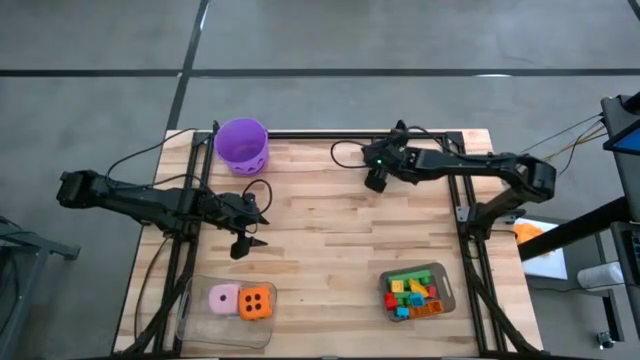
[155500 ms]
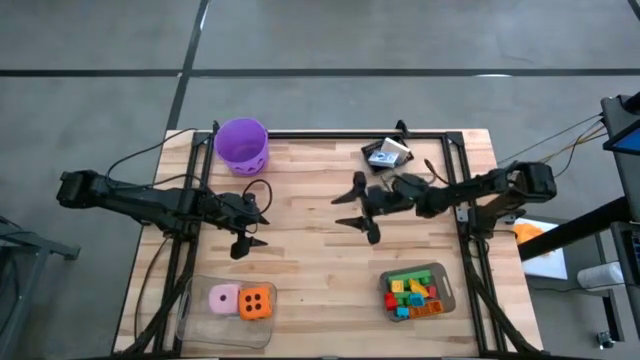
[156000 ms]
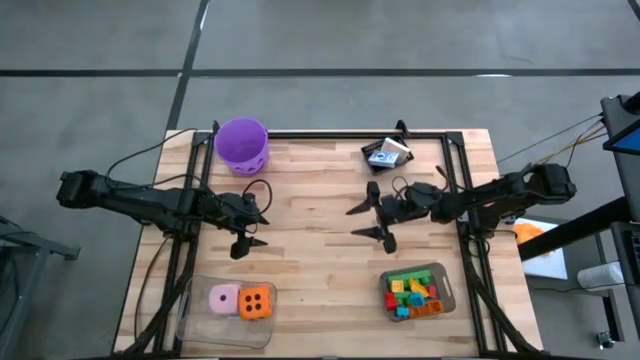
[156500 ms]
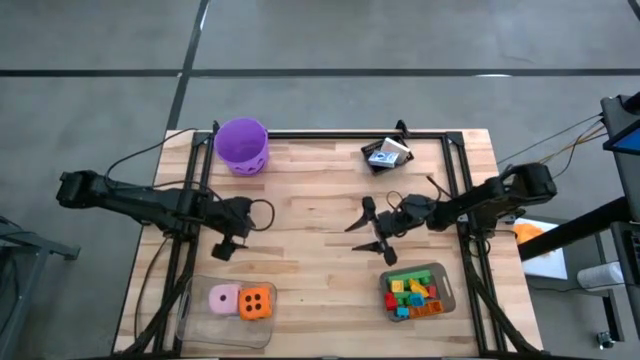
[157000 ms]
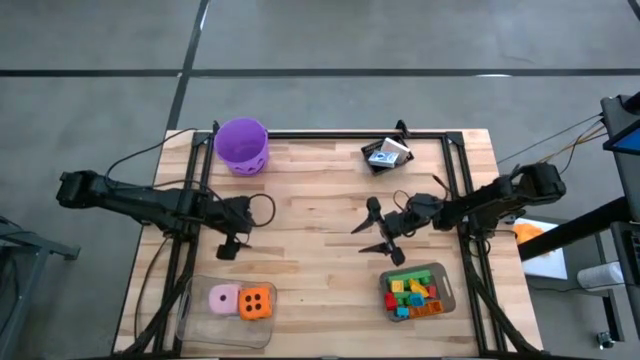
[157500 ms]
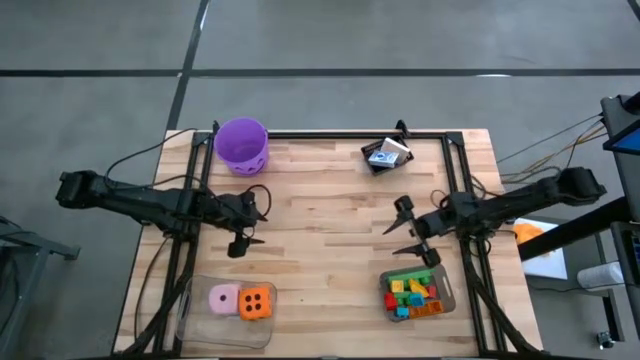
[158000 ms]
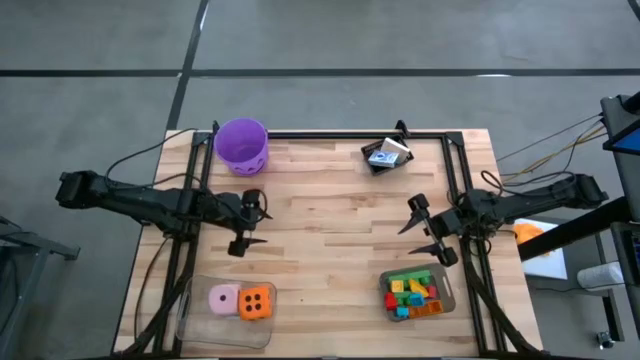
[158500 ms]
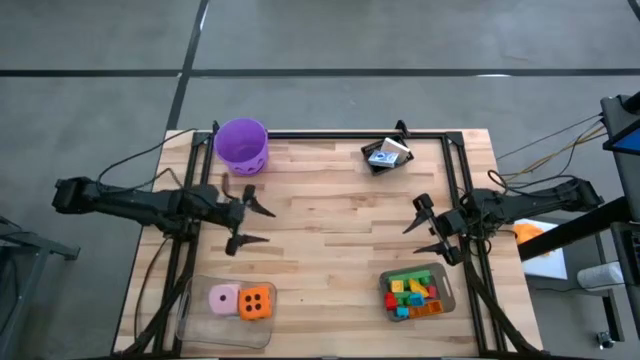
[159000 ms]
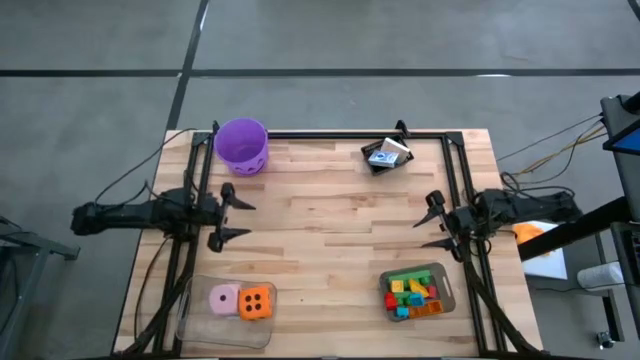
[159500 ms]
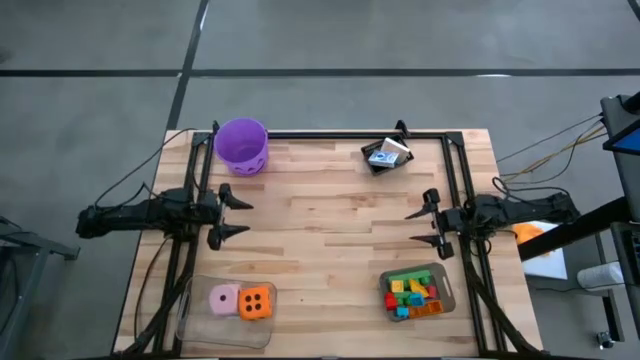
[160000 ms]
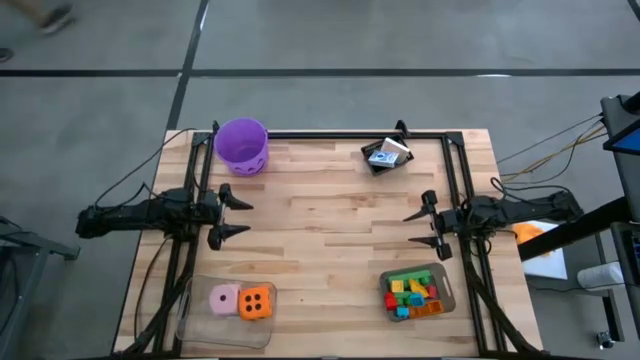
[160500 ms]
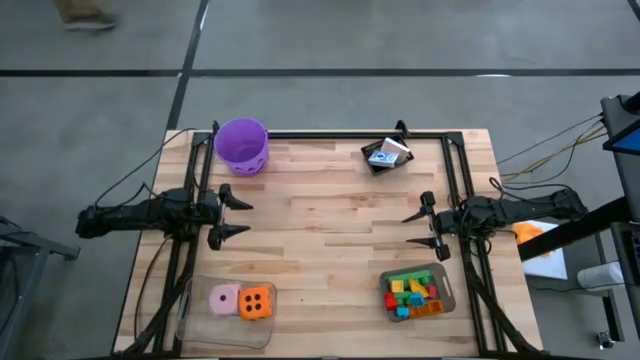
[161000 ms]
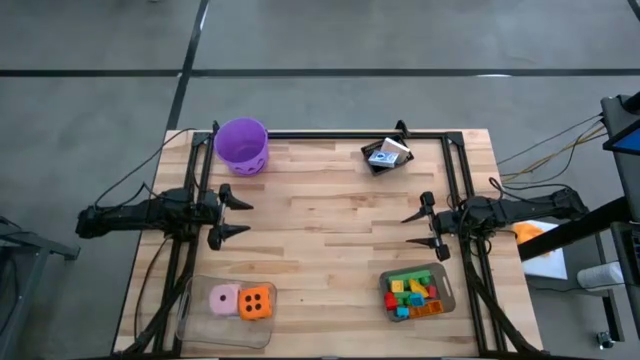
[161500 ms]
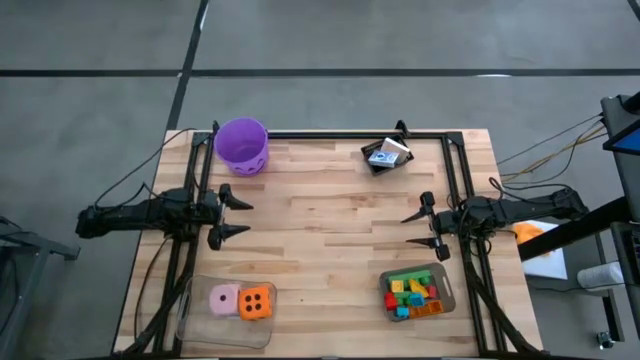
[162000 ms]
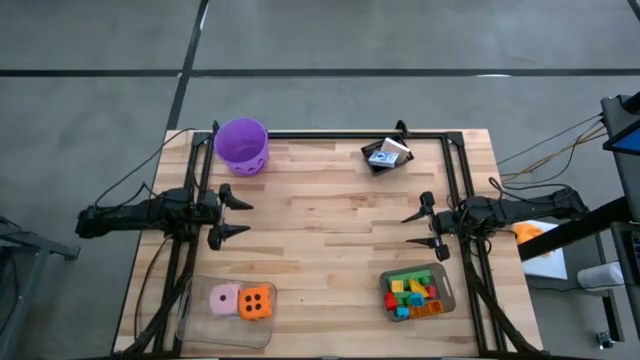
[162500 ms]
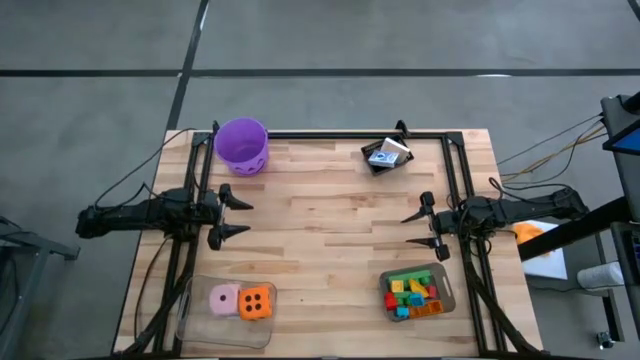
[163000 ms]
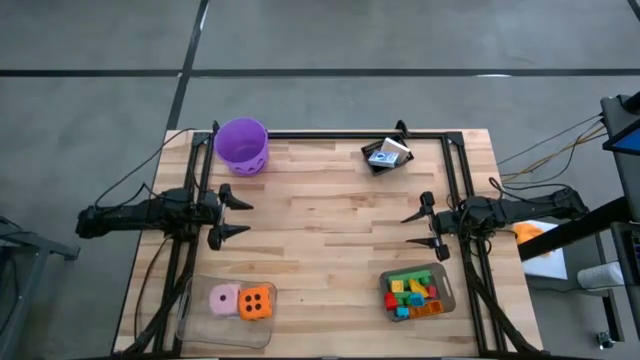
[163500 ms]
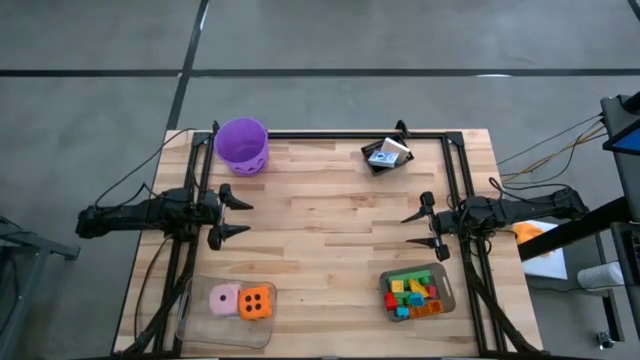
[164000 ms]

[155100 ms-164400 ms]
Task: Pick & Place Toys
Return to Home Position

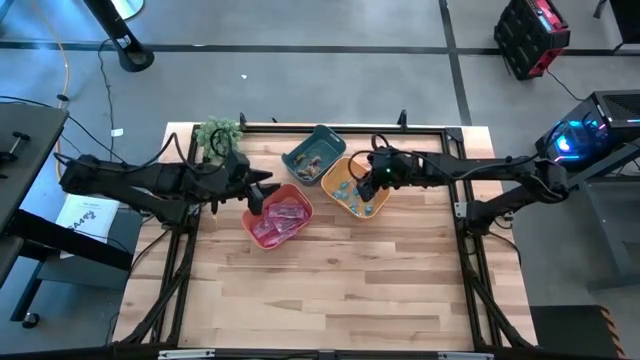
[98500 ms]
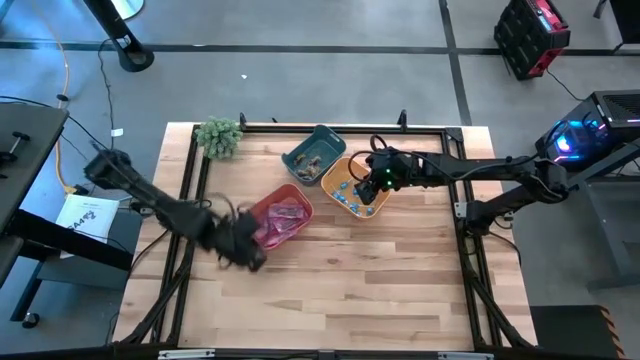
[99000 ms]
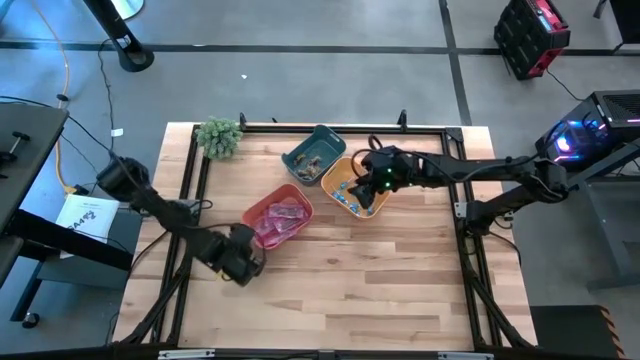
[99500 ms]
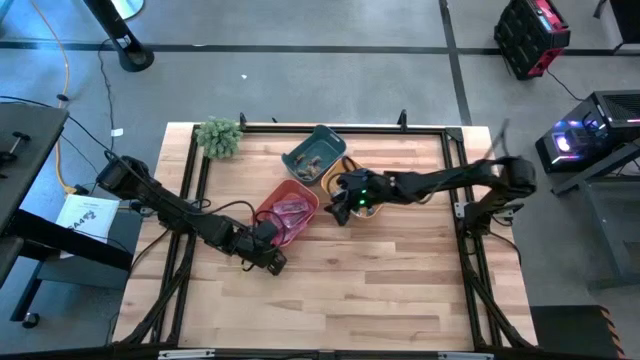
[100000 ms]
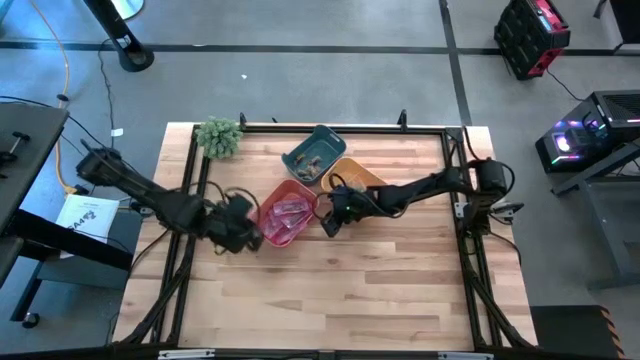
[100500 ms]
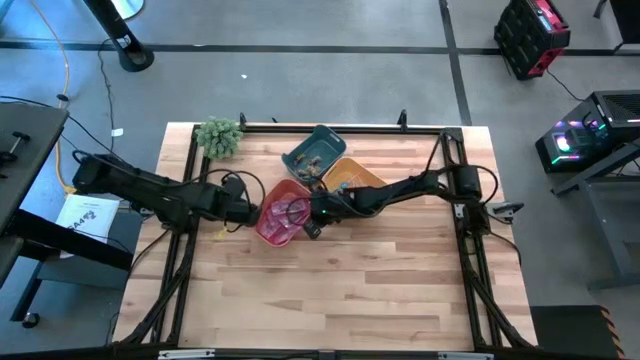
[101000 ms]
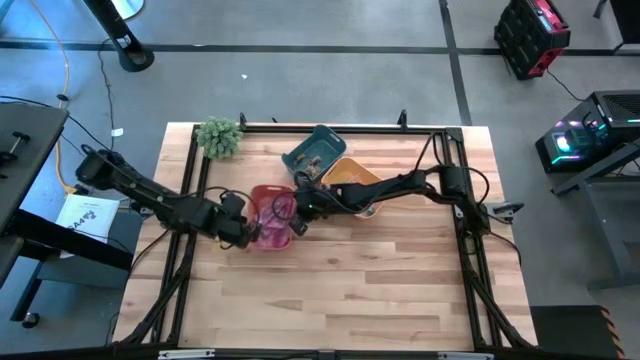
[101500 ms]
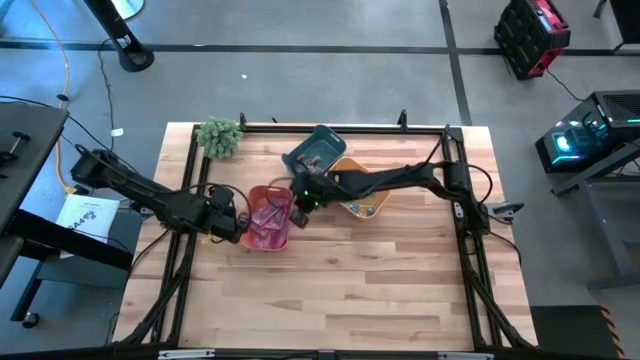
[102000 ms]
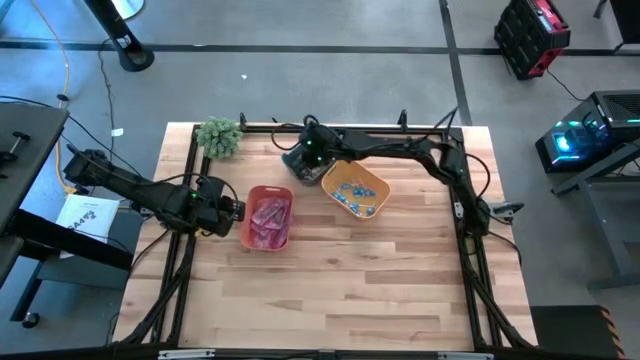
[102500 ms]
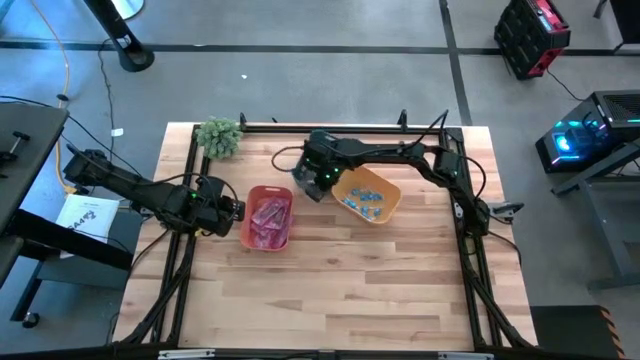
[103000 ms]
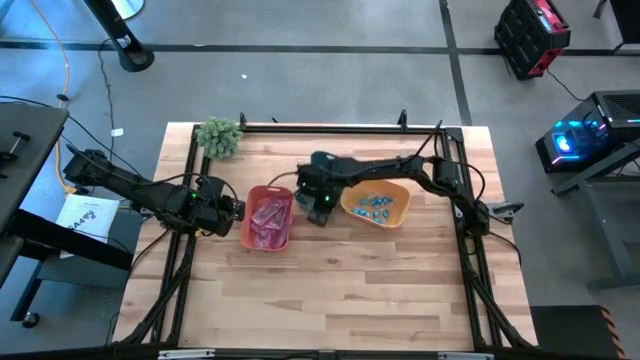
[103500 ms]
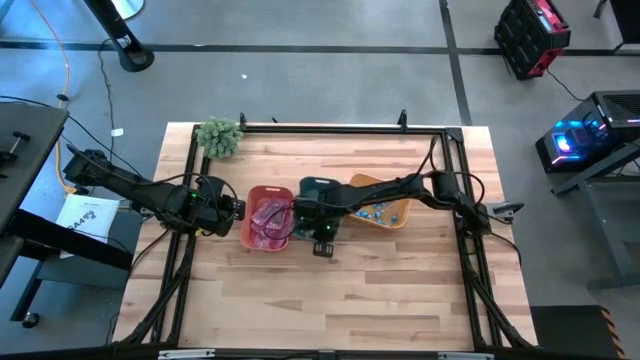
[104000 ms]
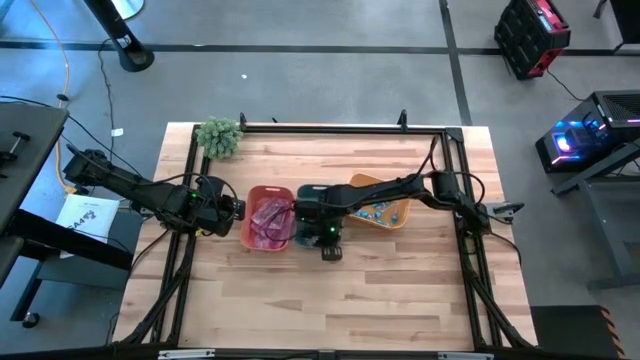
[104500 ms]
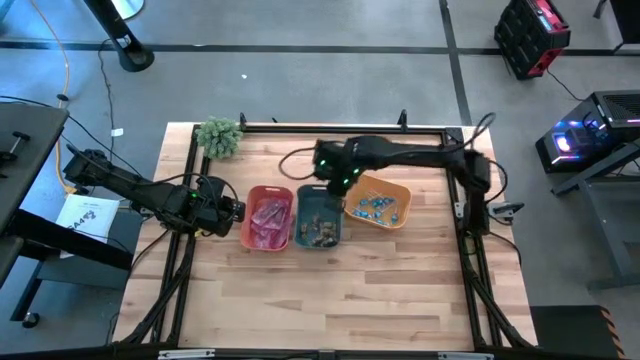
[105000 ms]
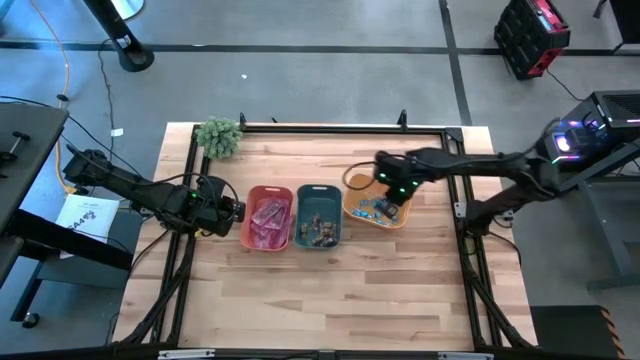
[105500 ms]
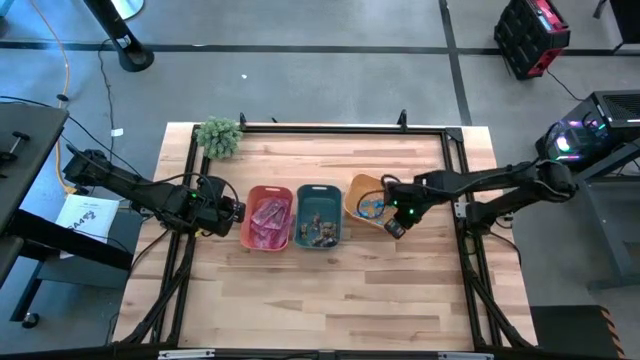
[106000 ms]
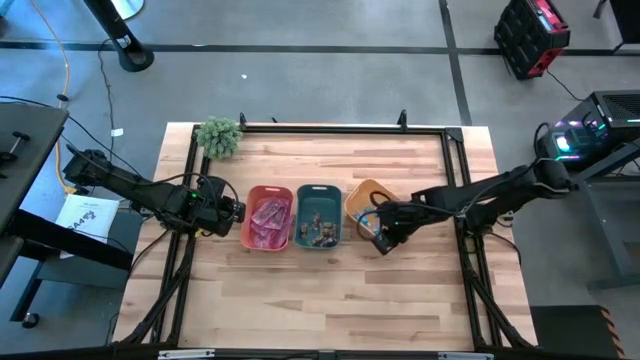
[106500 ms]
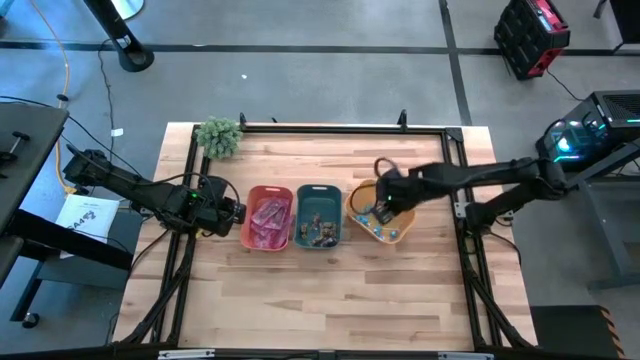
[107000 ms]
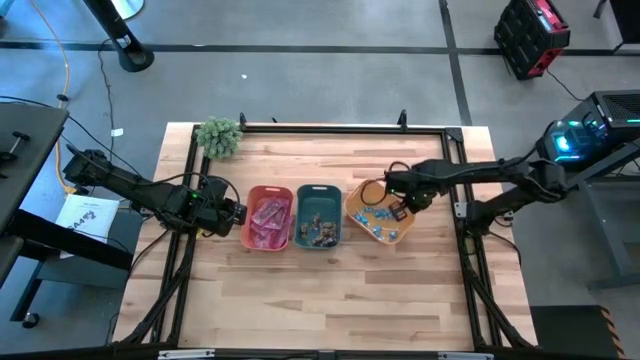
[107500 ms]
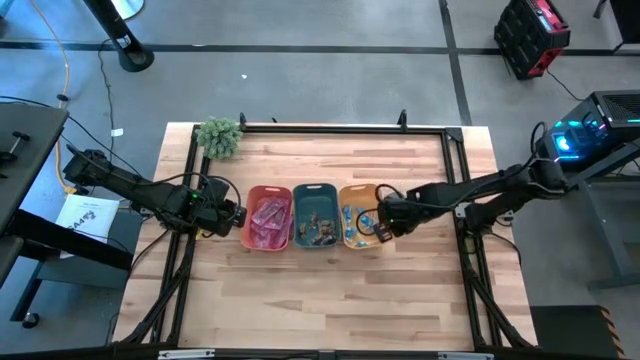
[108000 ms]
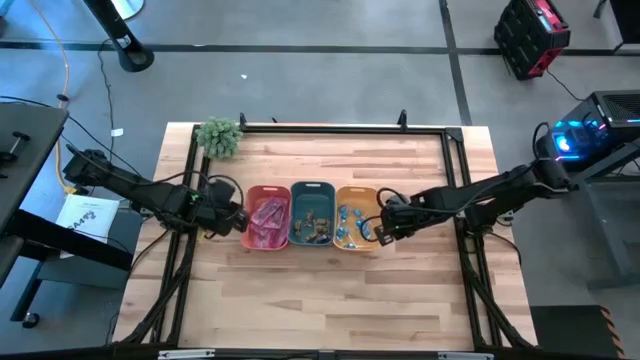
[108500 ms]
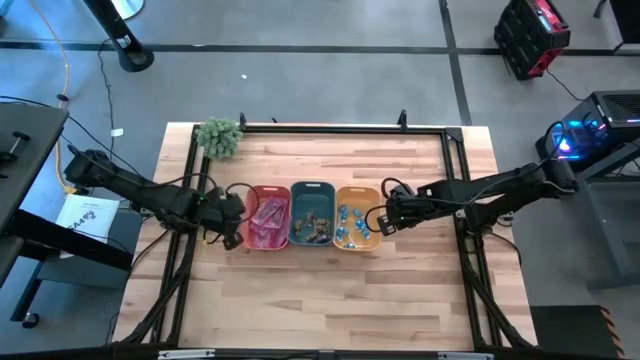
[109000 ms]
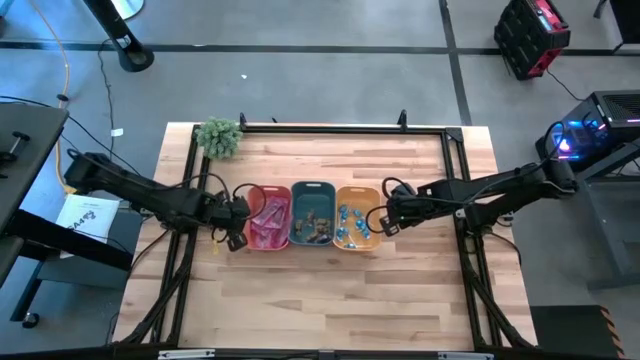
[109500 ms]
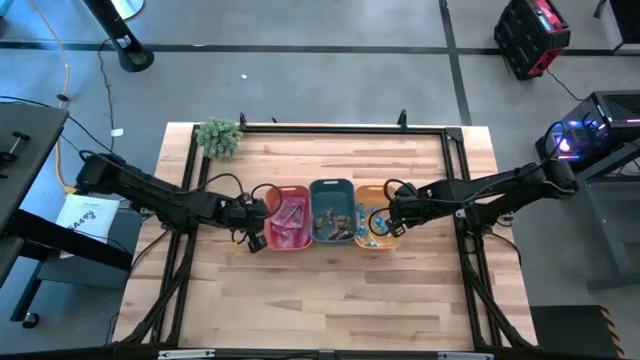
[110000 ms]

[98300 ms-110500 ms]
Task: Sort candy
Adjust the bins to the center of the table
